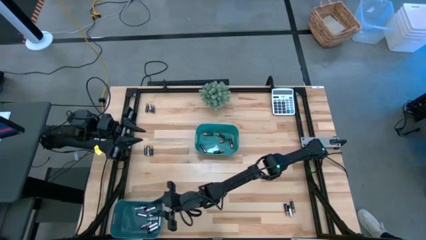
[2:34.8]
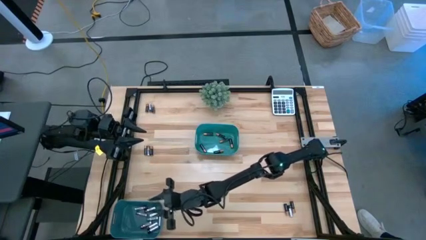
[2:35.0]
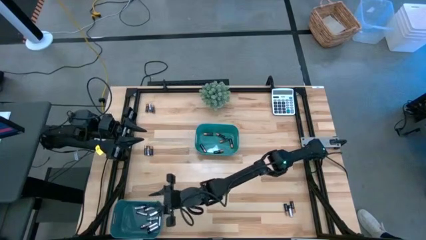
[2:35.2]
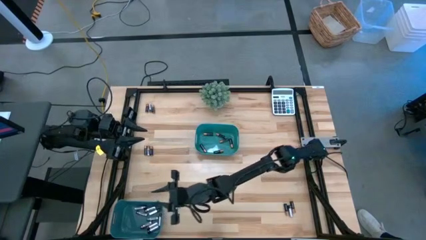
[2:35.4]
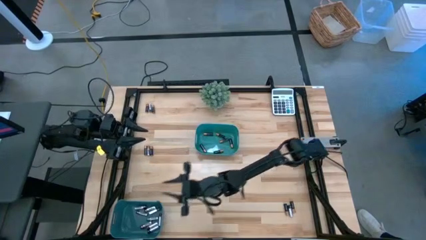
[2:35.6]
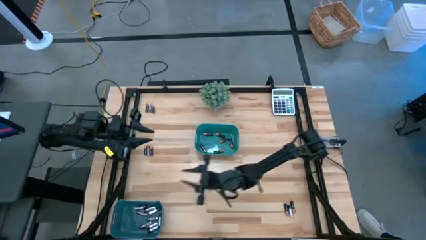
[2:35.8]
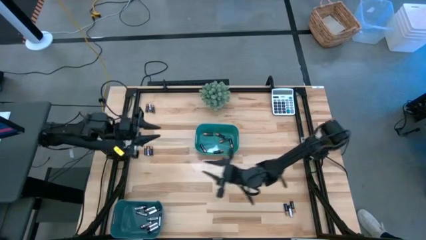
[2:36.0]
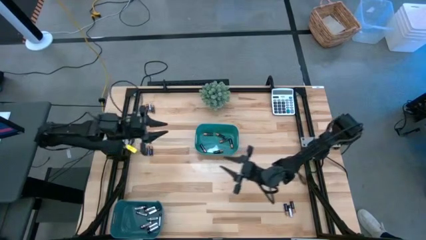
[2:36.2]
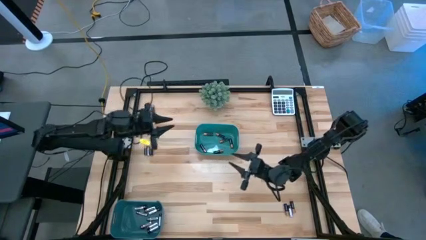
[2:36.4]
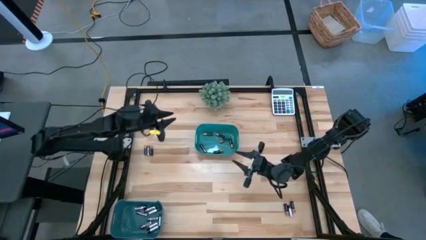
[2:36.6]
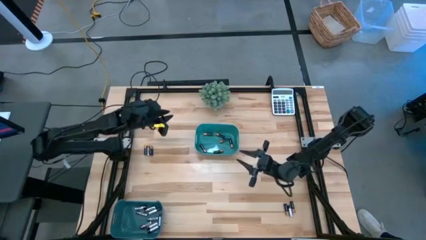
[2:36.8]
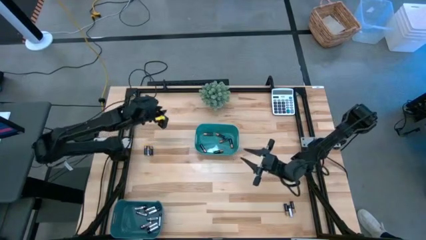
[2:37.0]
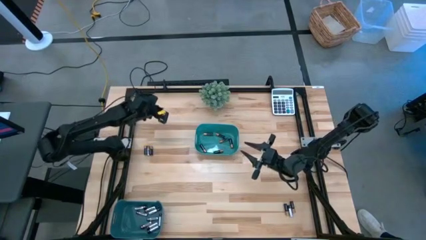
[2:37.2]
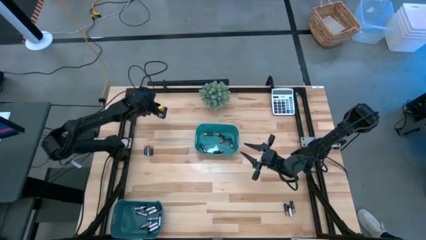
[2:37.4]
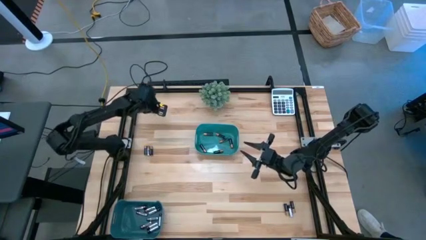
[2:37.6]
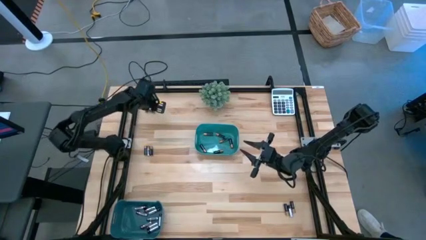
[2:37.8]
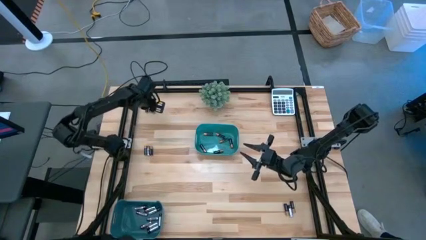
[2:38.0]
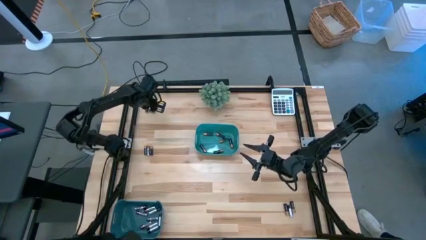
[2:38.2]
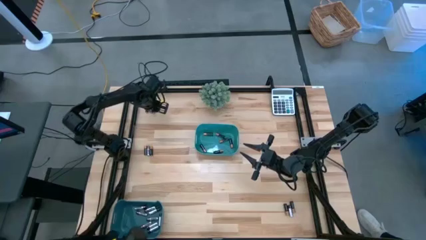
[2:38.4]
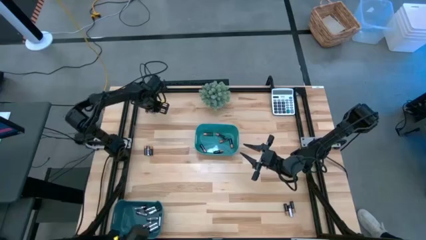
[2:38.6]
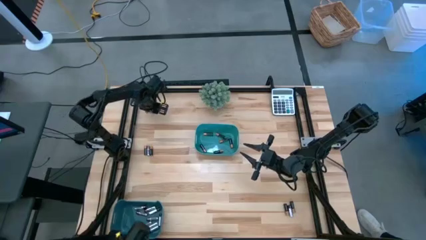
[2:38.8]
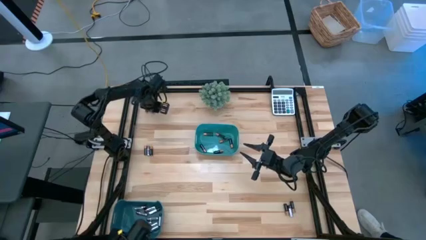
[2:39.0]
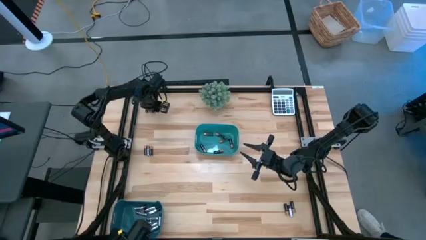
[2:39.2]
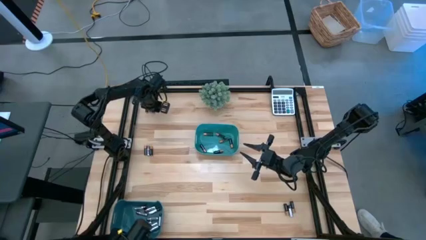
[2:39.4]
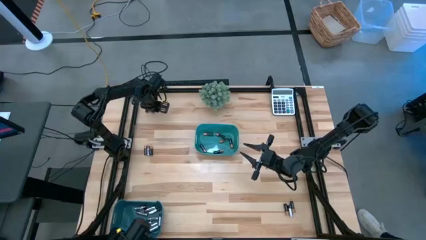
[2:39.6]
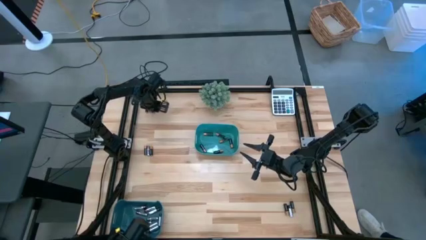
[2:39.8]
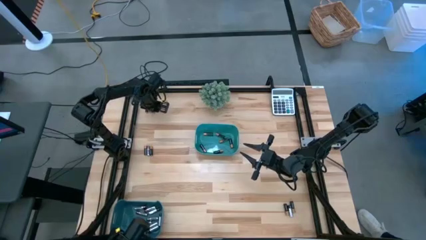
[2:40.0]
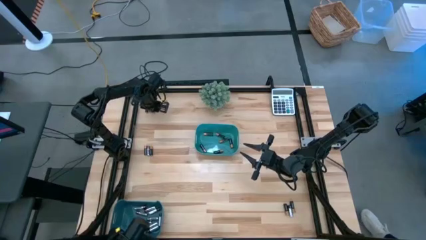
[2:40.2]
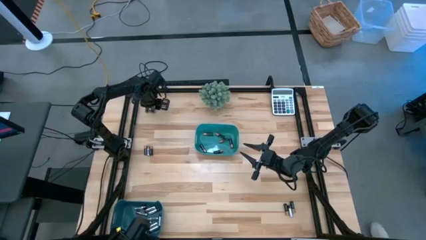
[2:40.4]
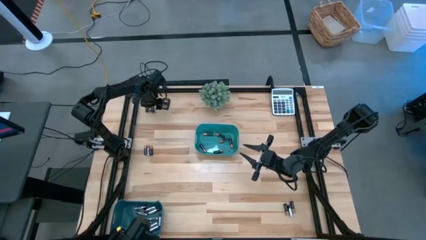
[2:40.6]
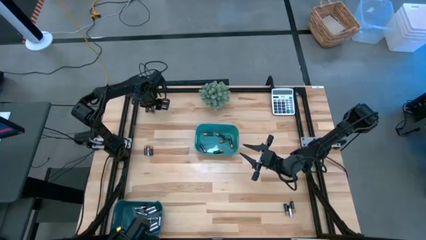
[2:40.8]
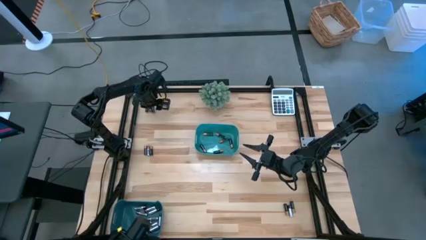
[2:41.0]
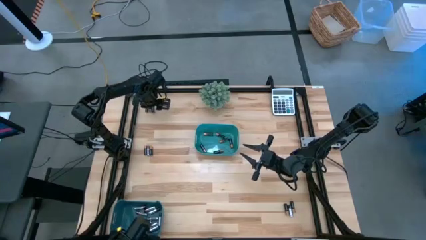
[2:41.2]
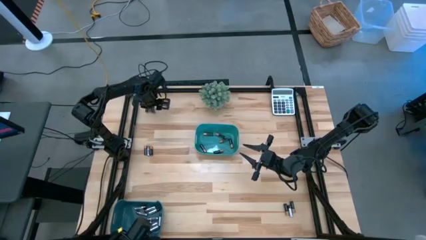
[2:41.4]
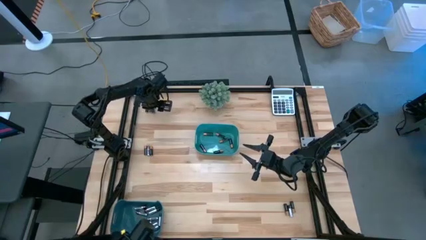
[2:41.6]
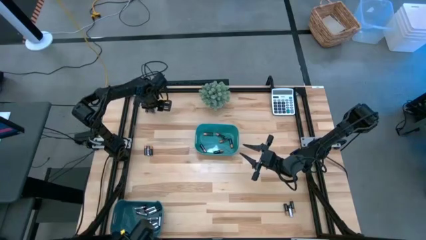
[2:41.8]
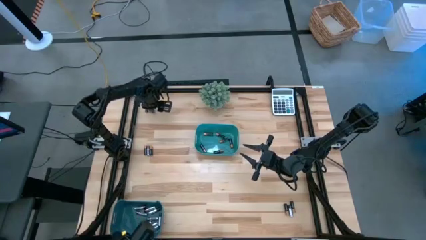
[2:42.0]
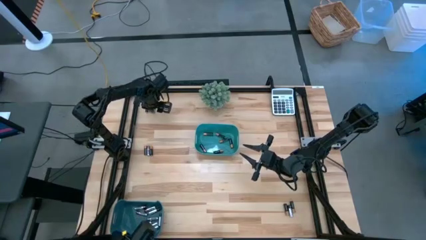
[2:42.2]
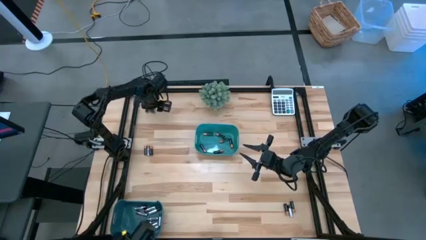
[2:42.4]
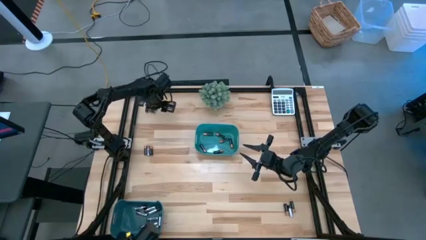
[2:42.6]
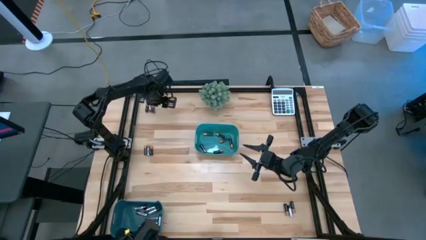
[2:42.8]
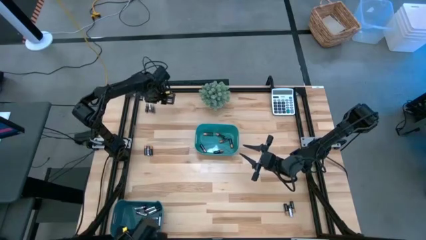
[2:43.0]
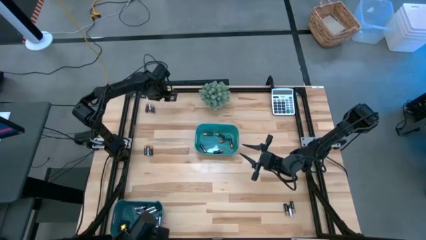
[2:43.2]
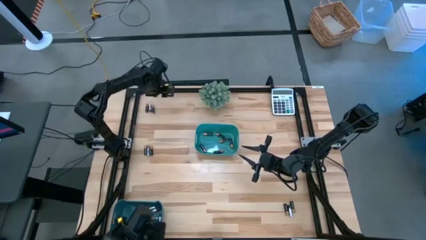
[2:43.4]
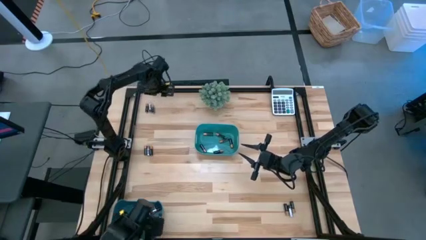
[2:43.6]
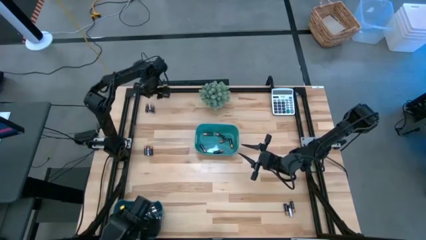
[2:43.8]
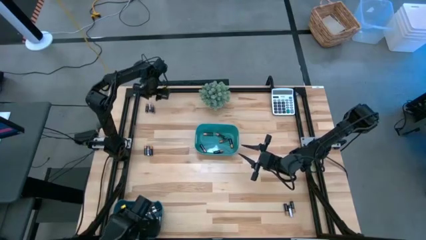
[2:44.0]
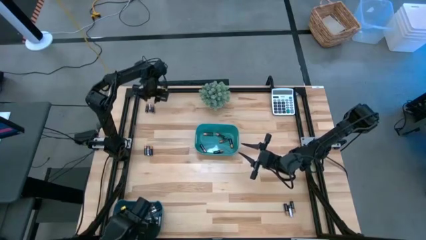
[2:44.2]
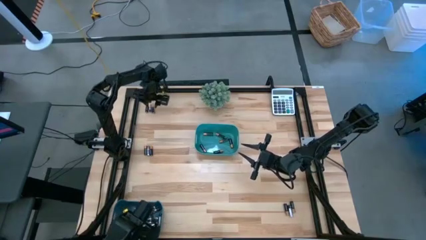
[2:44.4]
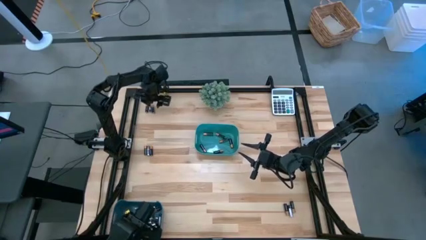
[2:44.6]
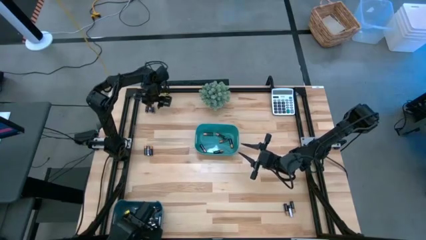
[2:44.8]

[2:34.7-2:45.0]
Task: Sort batteries
Put the black battery into the green bin

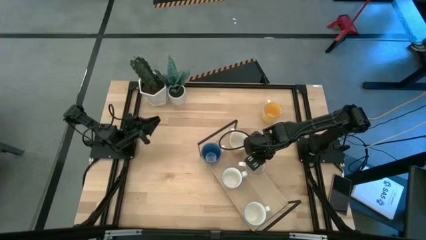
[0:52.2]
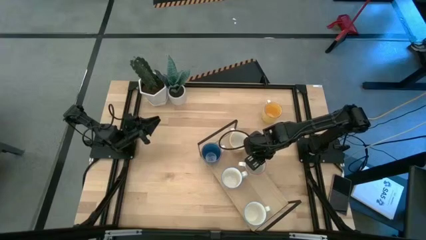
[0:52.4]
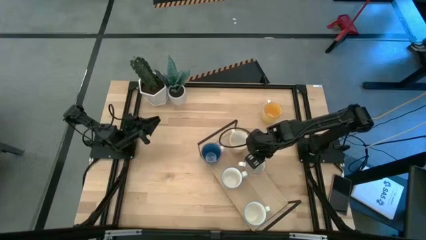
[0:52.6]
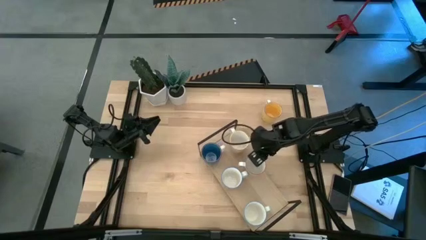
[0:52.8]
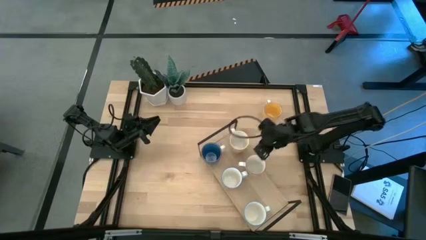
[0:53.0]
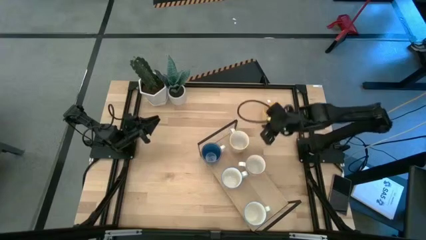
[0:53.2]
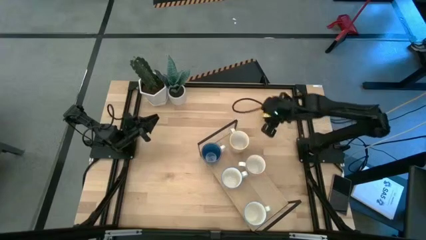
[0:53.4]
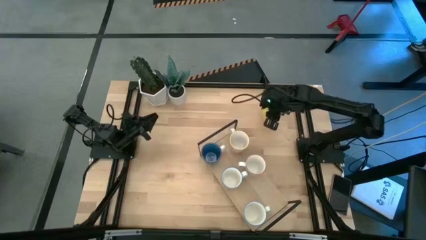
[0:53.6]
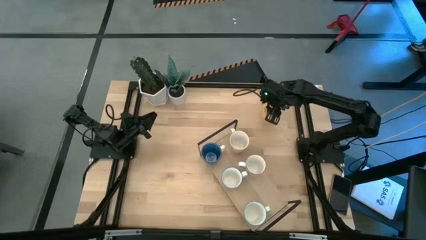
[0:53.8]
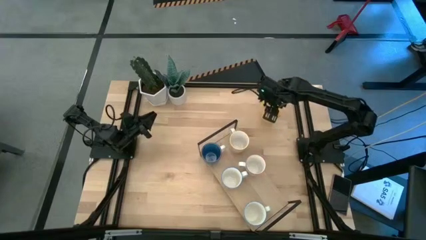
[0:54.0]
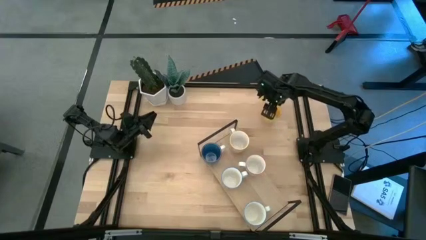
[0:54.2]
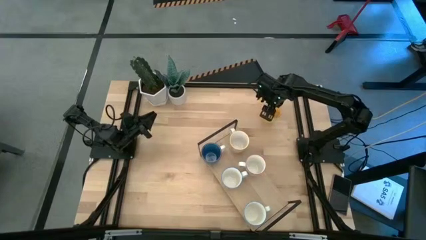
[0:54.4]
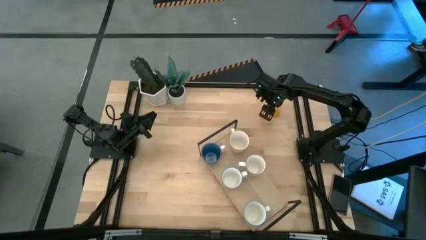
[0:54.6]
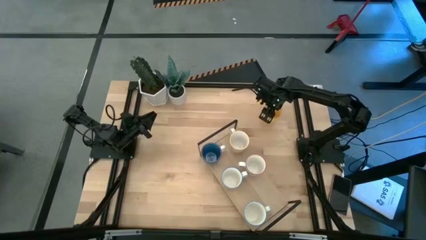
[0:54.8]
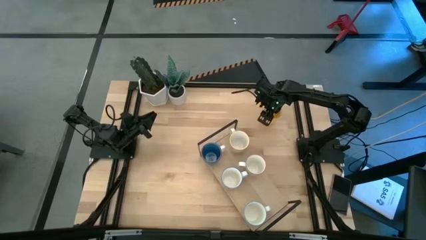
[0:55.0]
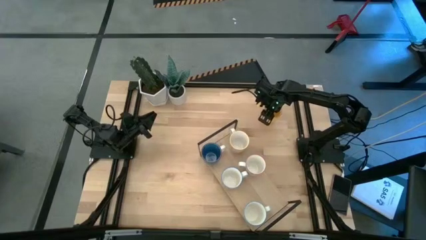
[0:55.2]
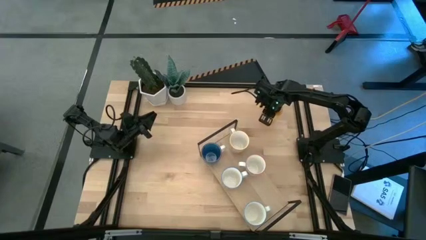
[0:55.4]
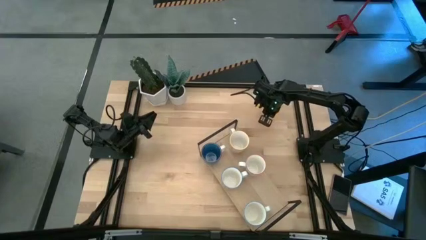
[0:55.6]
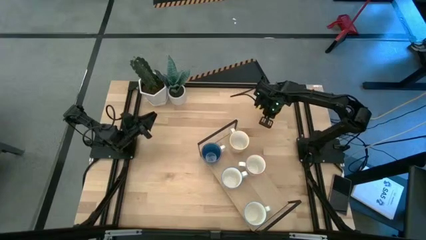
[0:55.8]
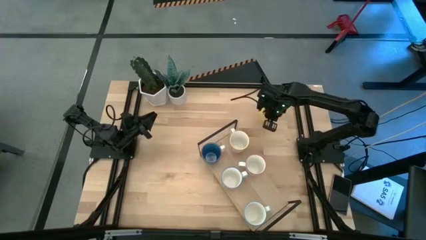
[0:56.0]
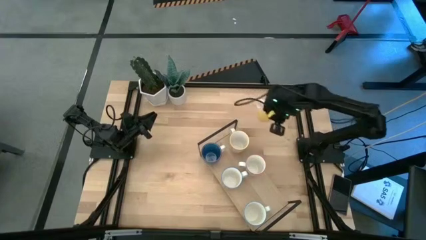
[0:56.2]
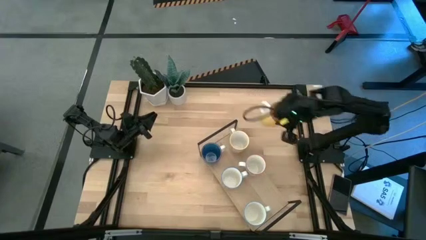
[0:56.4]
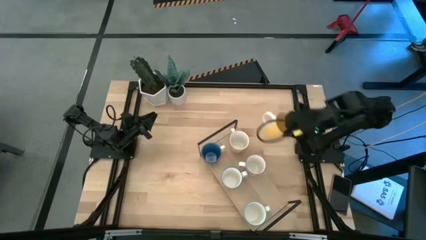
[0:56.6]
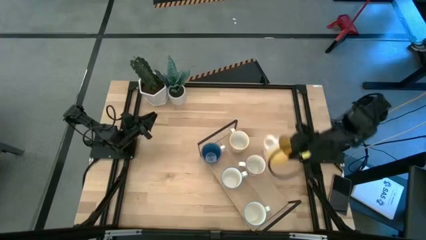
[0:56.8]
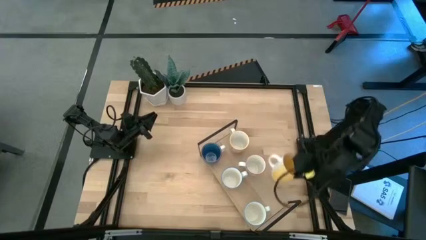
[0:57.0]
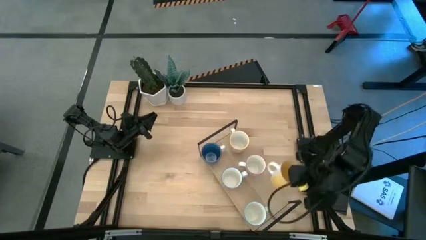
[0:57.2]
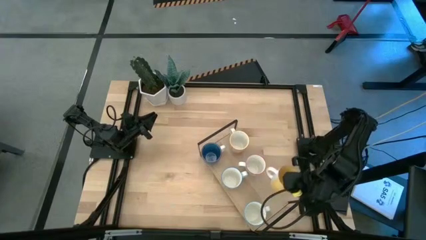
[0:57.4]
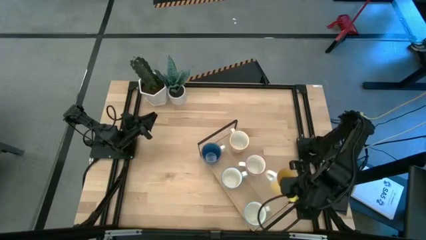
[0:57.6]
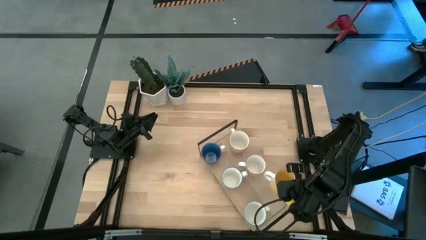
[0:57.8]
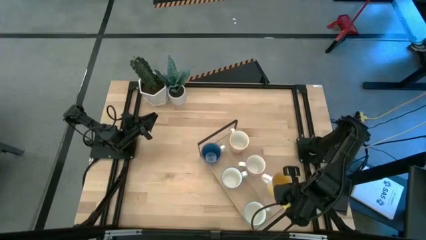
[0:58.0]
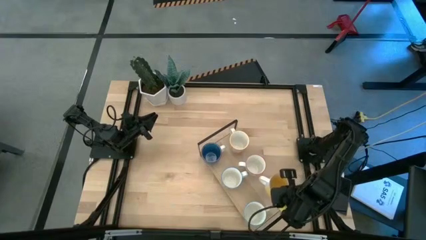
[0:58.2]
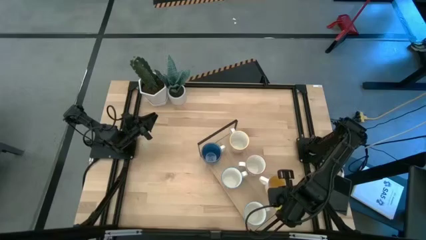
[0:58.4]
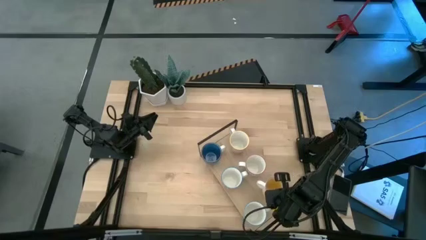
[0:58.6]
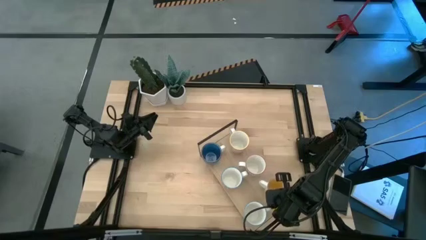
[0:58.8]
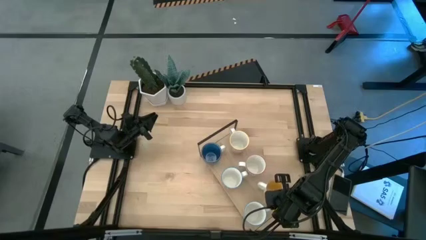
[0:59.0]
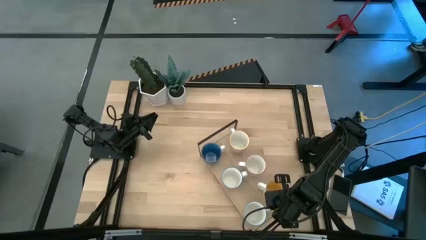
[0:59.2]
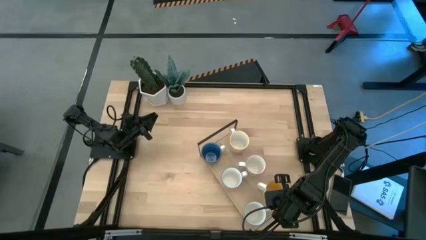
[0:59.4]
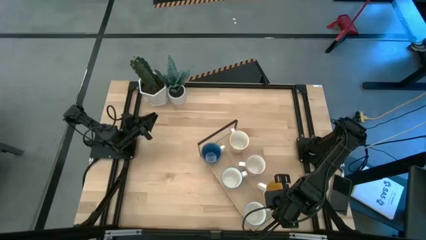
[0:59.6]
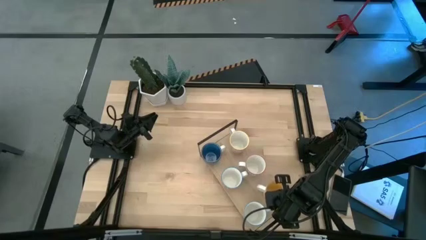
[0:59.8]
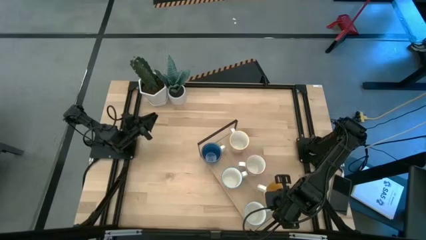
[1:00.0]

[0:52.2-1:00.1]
Task: Place coffee mugs
Put the yellow mug on the shelf
